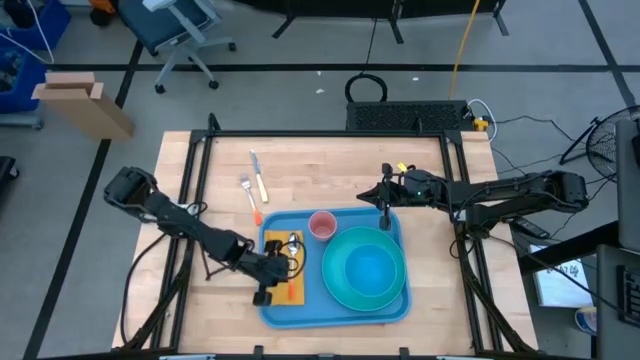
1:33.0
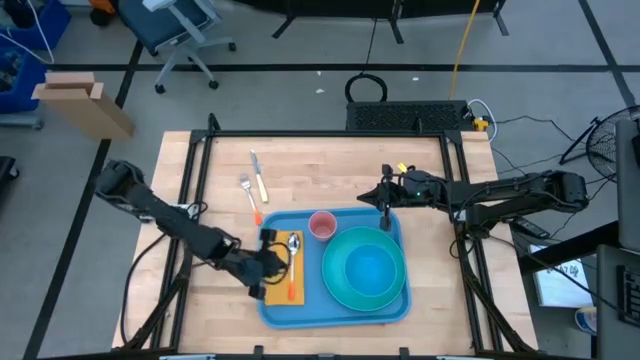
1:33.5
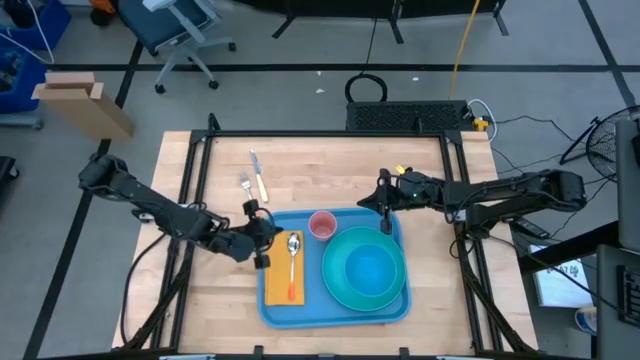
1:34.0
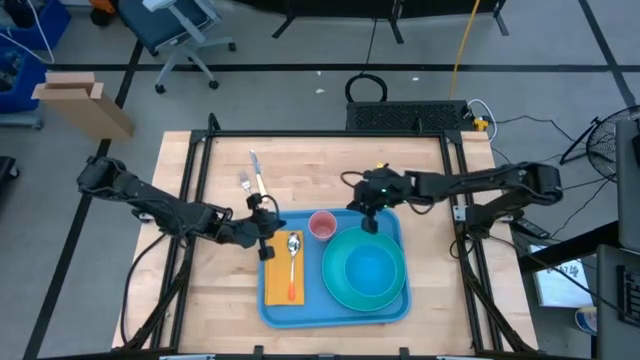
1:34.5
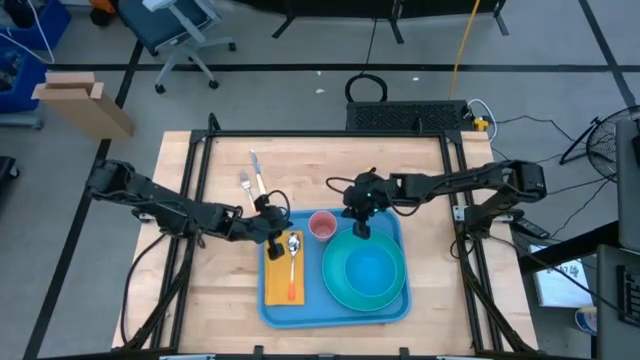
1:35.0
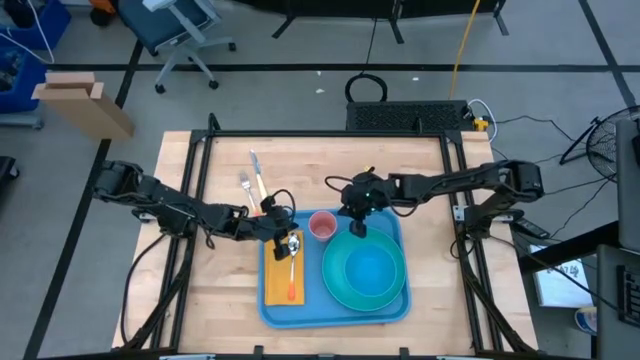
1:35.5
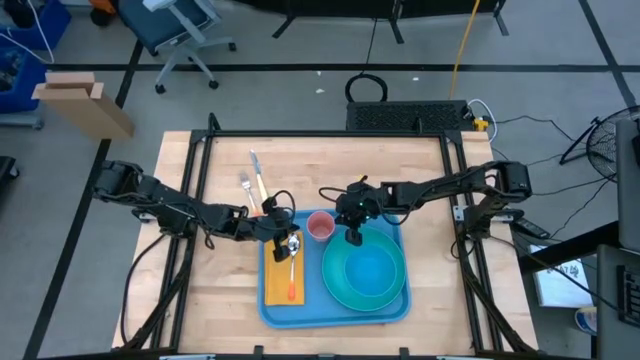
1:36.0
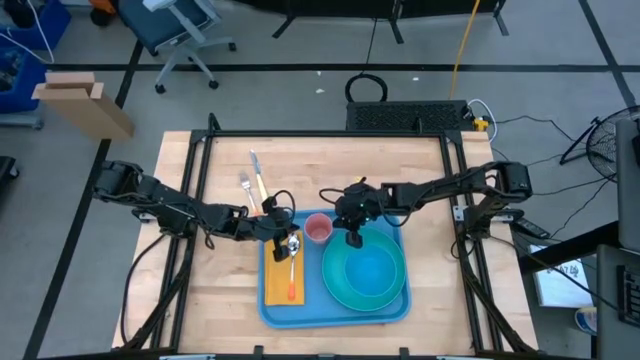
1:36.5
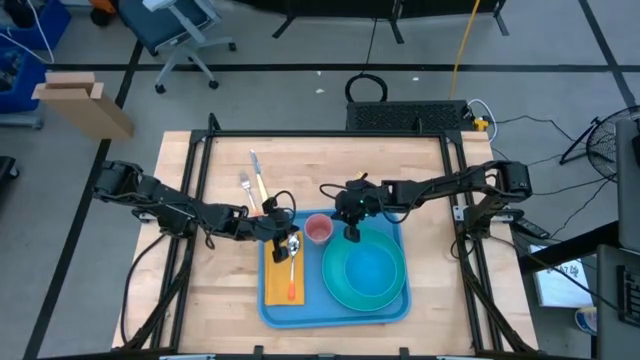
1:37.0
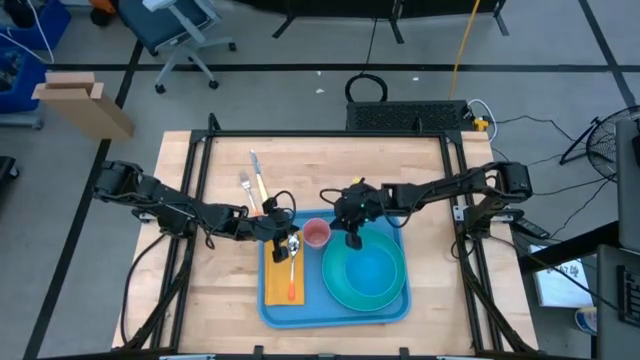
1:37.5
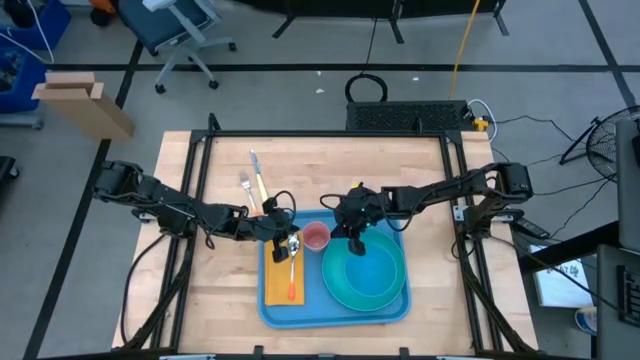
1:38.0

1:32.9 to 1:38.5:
Task: Set up tray
Adjust the pink cup on the blue serving tray

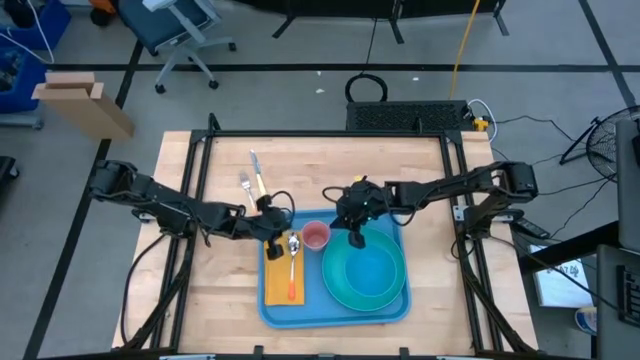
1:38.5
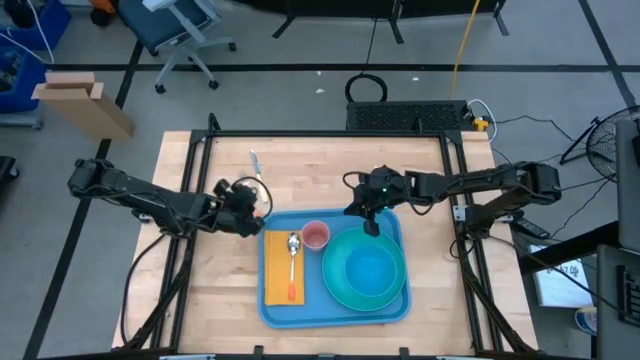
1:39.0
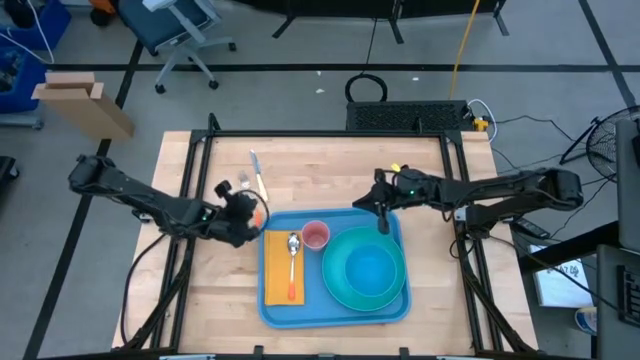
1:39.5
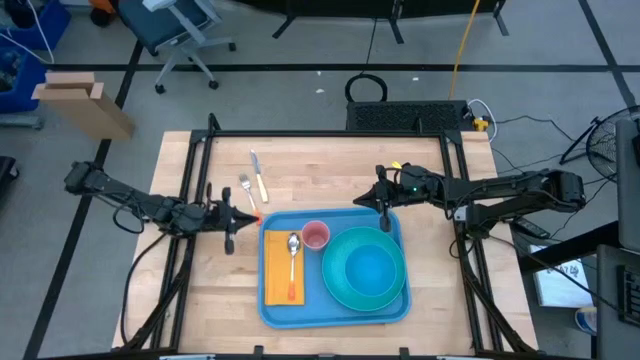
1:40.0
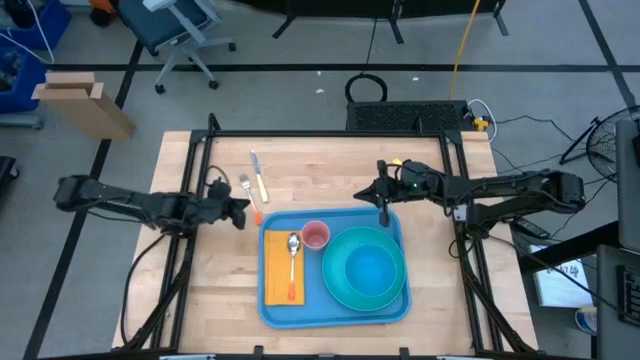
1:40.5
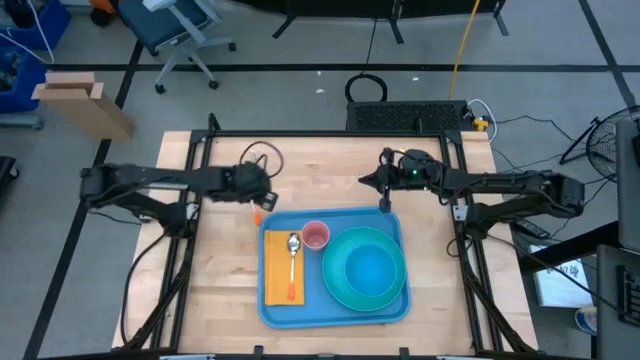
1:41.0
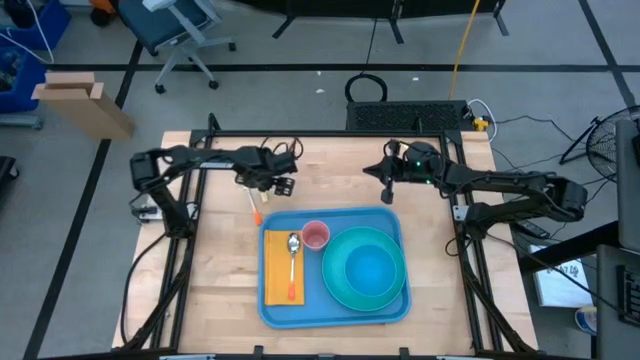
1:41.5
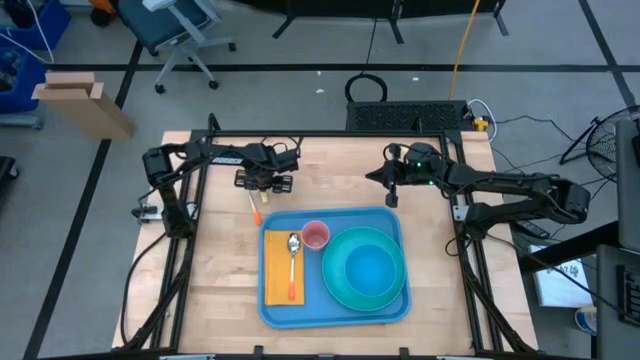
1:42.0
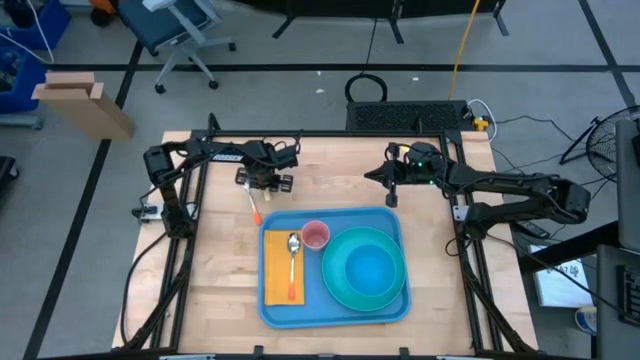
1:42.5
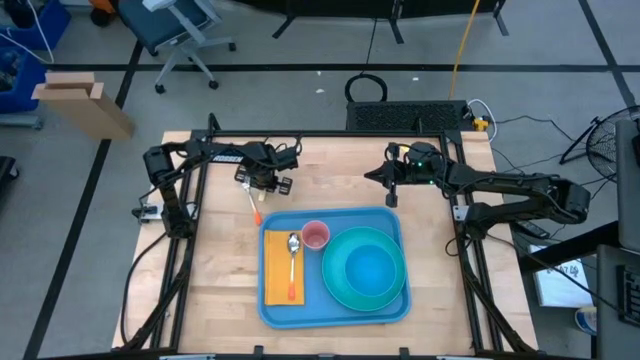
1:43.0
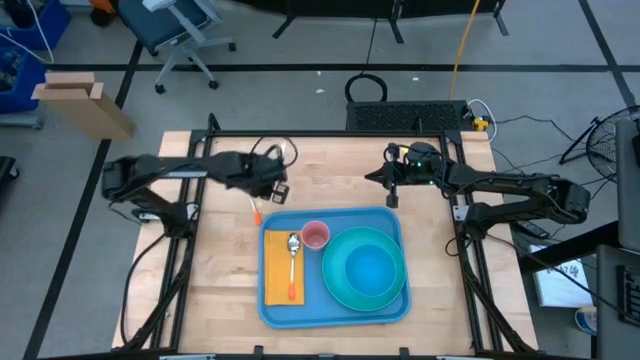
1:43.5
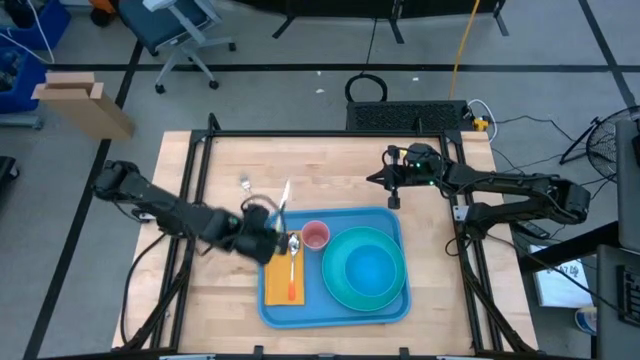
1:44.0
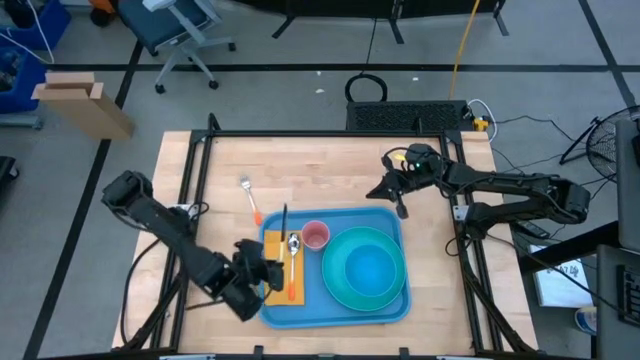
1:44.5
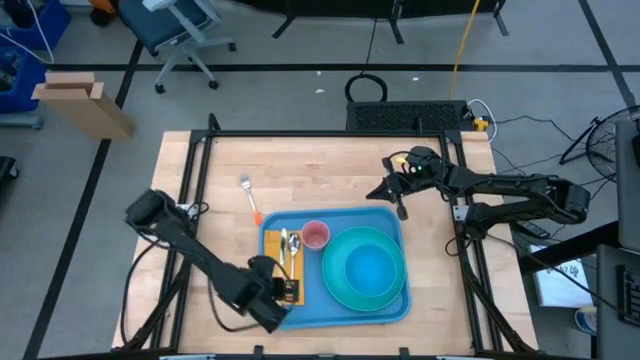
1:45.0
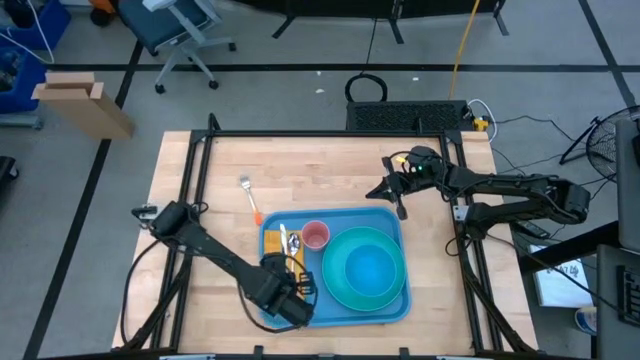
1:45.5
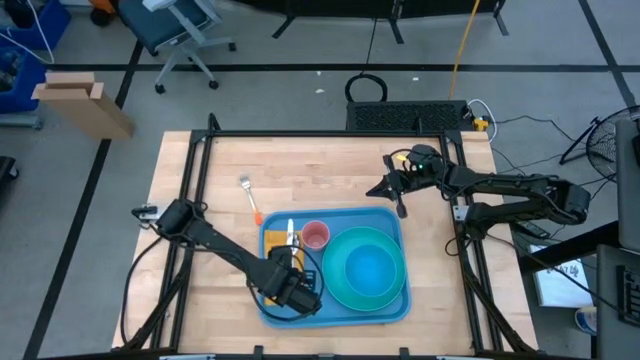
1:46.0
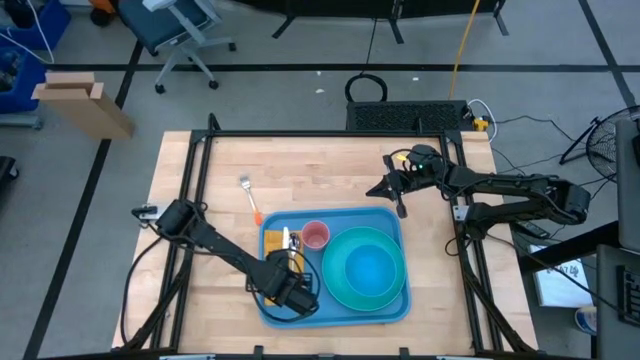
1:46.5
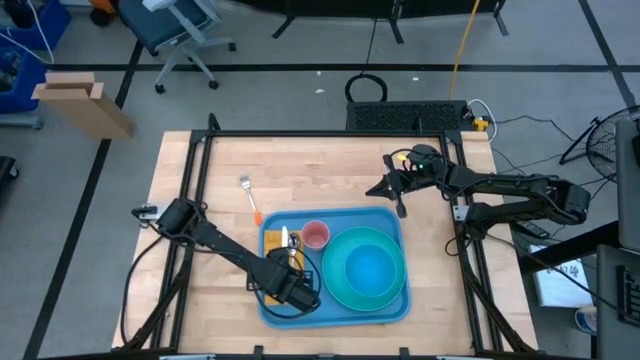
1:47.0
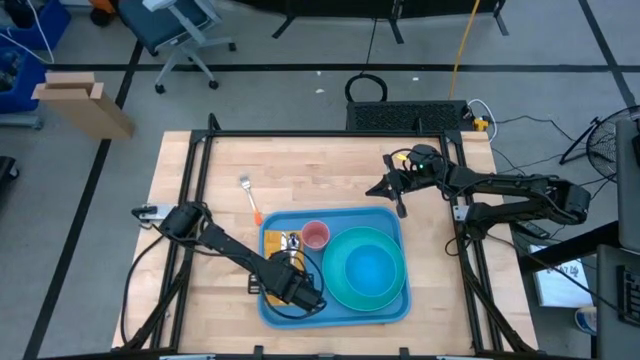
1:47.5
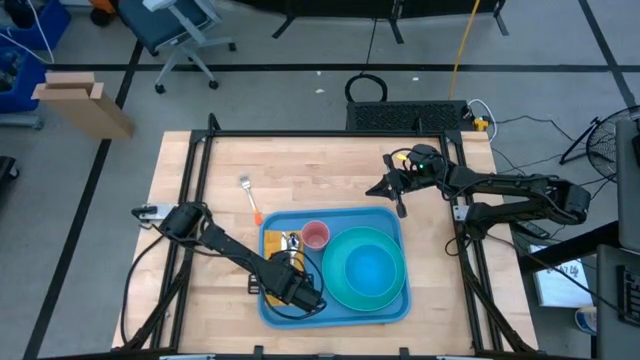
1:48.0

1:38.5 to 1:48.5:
Put the yellow knife on the yellow napkin

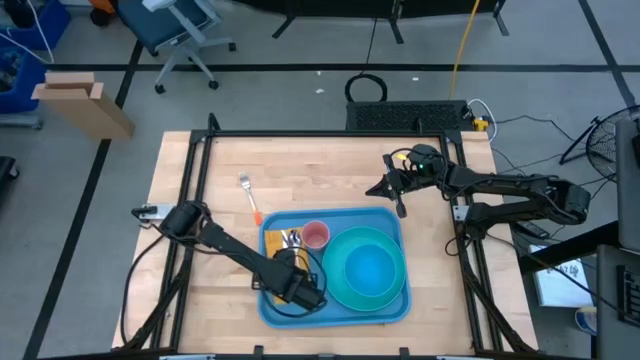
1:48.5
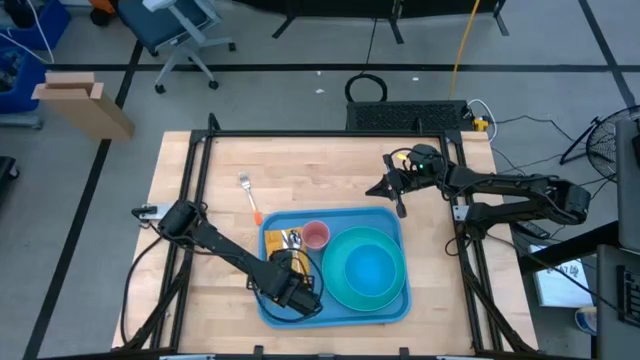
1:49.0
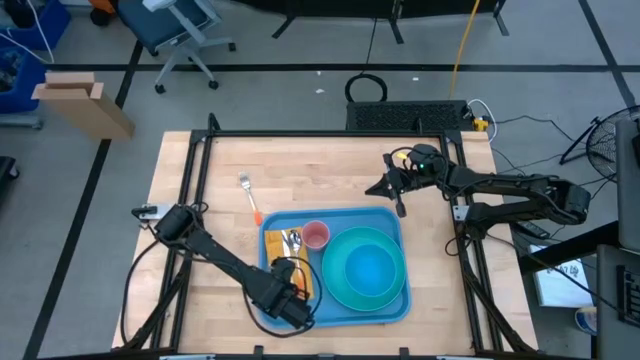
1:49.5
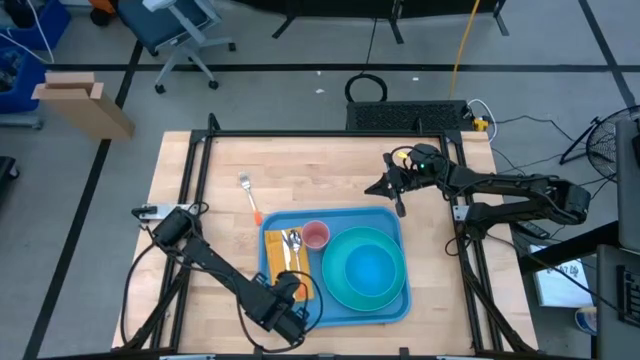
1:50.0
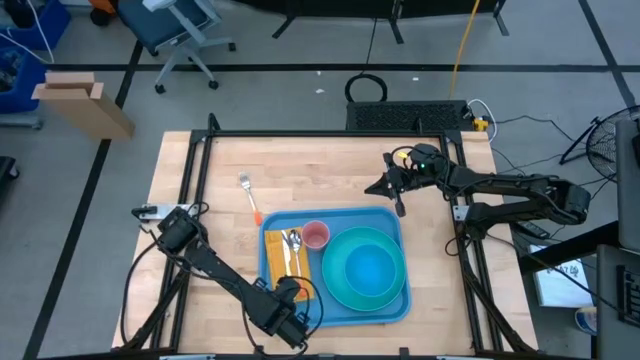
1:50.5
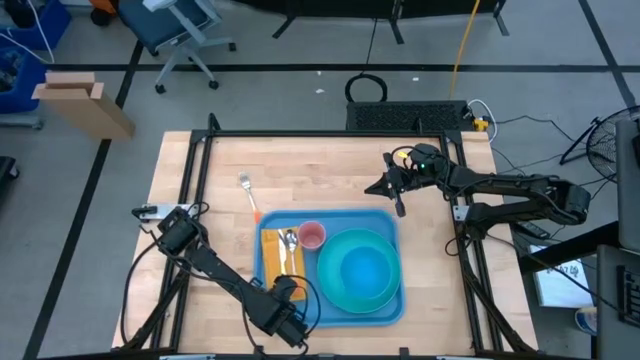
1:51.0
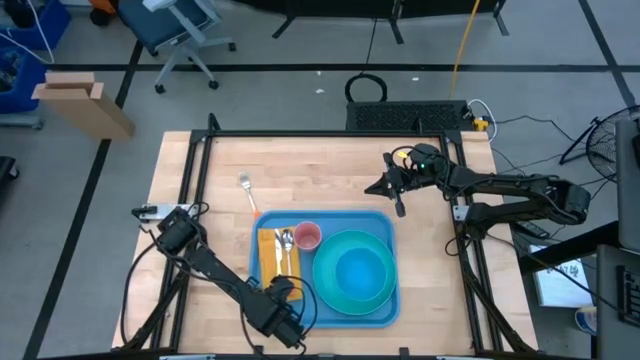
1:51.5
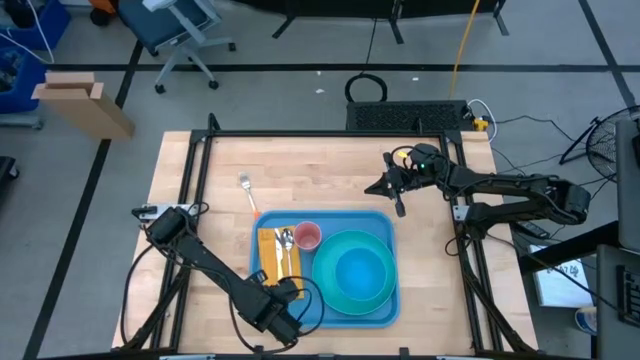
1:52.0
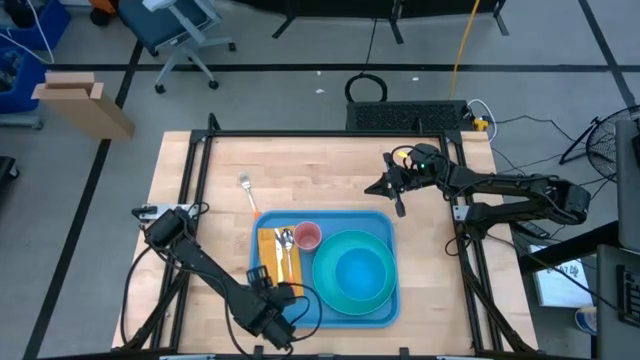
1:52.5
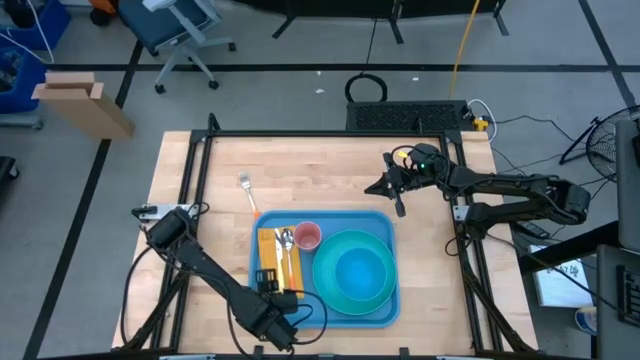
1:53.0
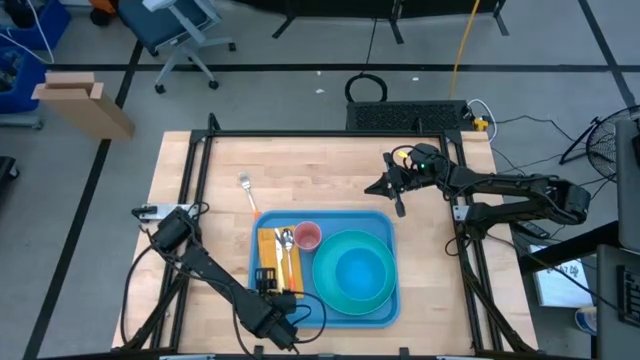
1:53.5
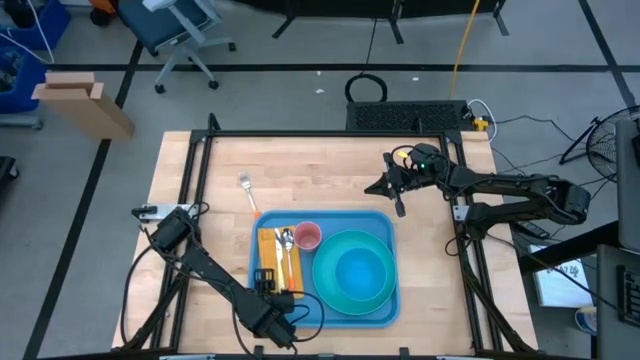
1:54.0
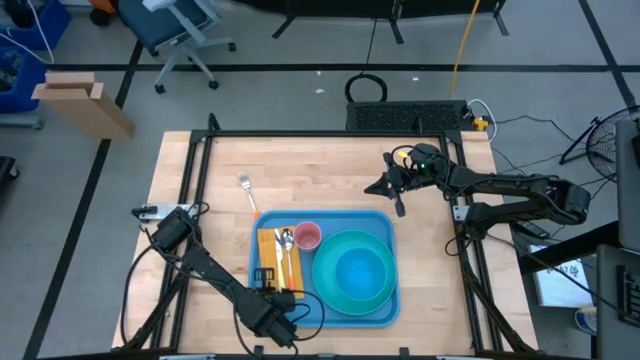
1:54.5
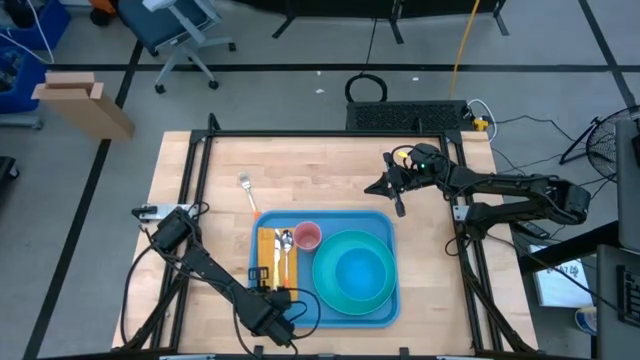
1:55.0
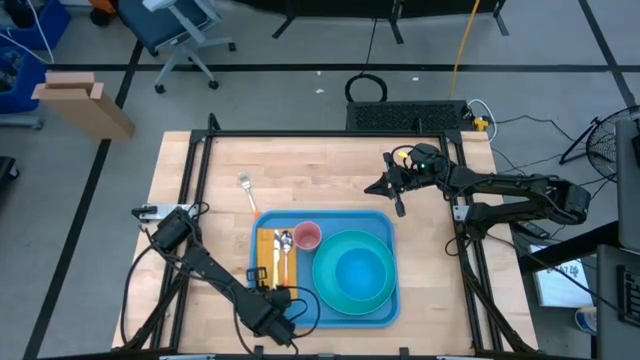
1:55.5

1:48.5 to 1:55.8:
Adjust the yellow napkin on the blue serving tray
